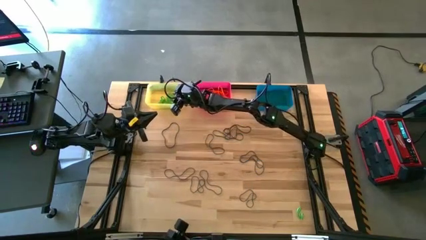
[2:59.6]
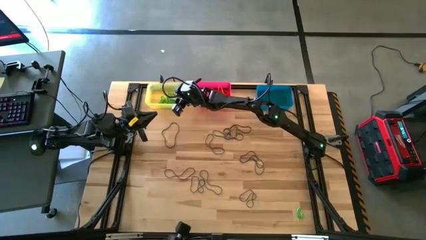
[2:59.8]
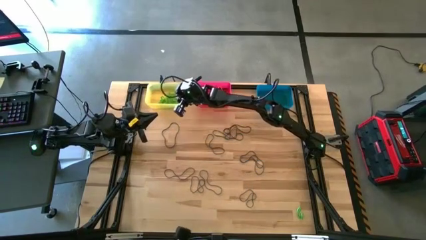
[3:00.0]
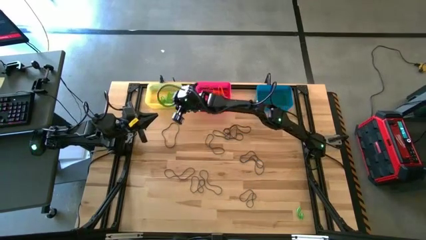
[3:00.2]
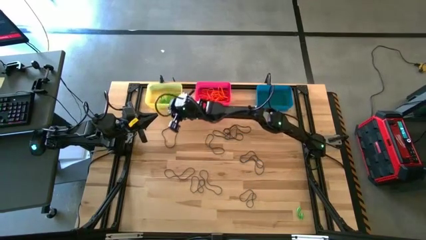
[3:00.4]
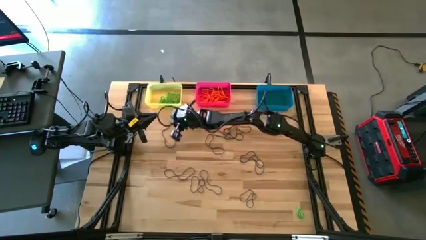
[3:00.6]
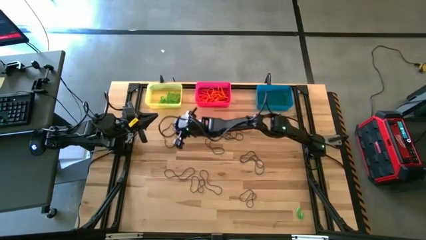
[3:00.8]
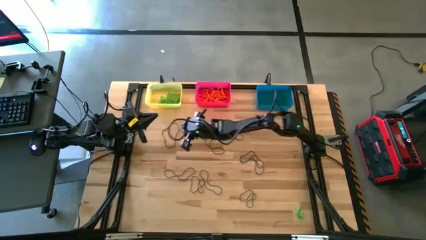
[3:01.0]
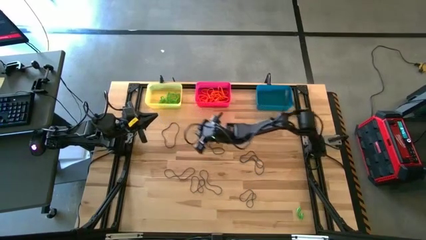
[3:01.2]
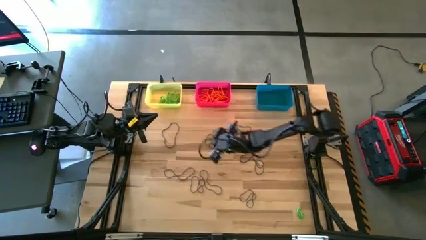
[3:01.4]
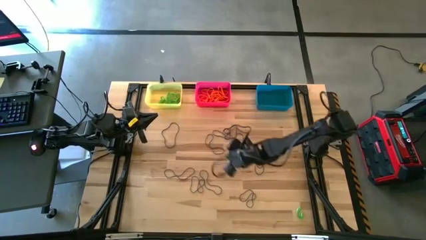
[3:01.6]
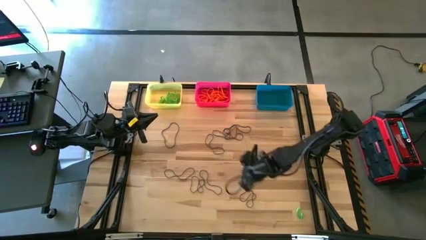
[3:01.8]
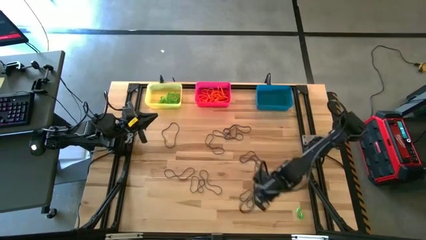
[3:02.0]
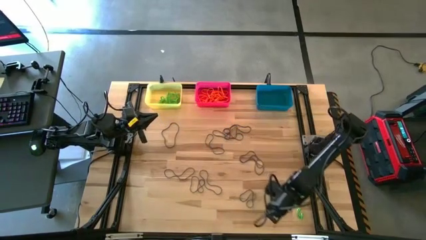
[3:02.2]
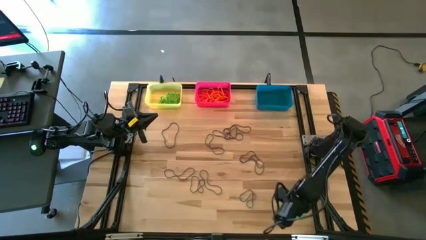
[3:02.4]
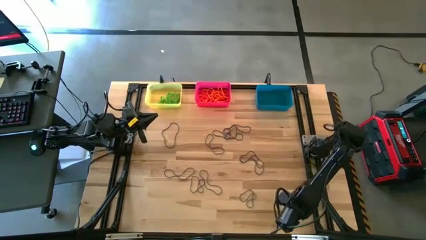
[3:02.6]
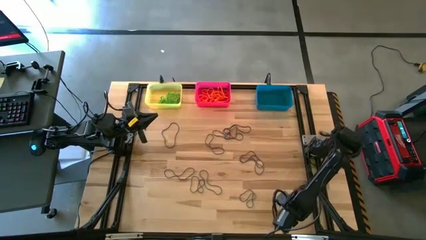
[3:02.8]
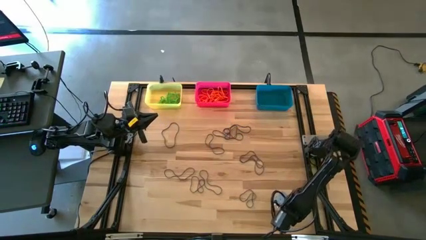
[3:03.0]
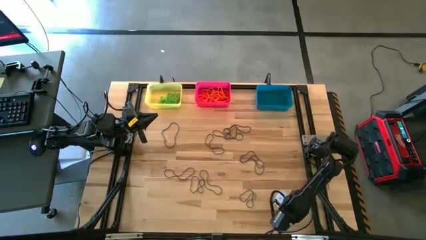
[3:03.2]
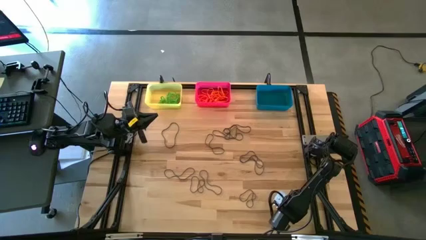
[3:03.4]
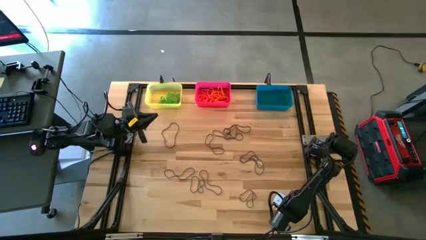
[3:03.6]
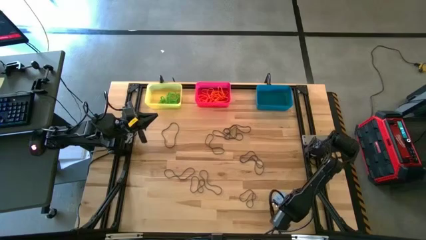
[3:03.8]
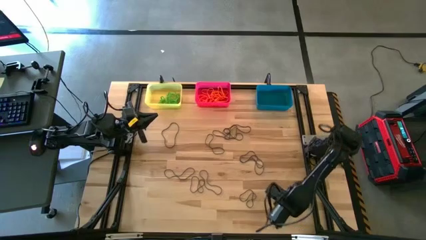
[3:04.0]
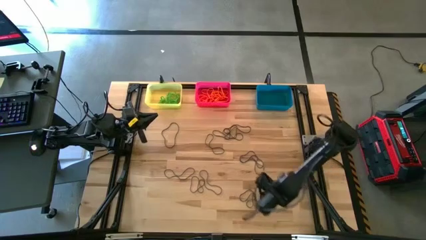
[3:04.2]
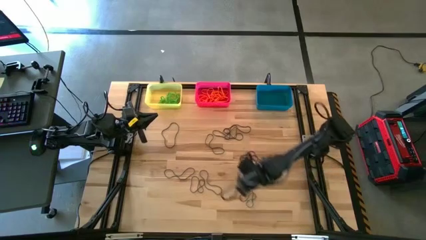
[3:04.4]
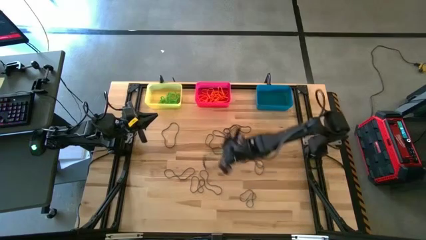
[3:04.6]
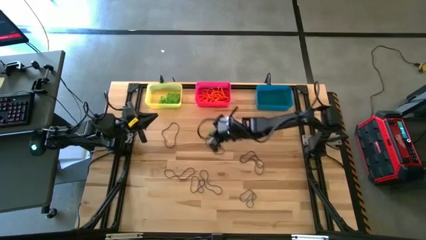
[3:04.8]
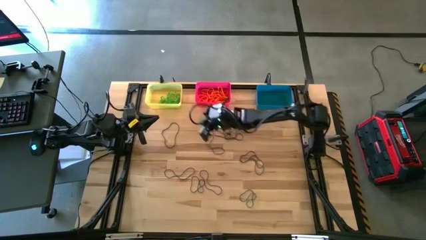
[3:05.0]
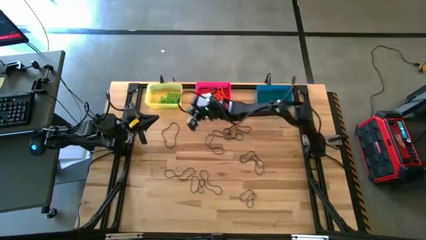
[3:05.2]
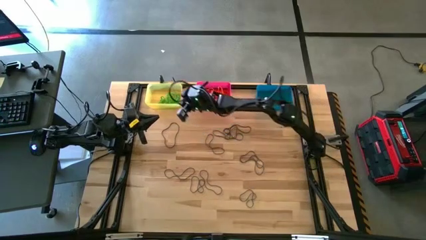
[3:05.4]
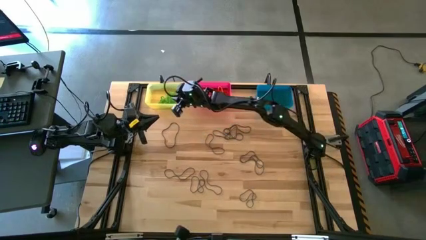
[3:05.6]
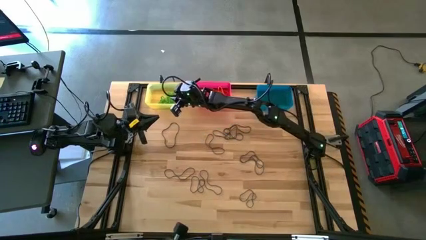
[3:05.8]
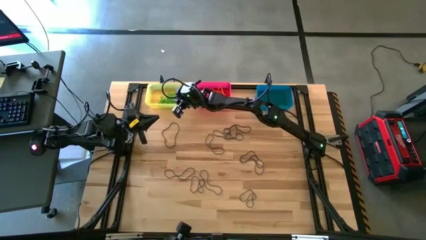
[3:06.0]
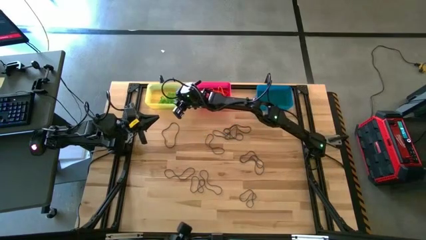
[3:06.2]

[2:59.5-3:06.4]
Task: Sort rubber bands into baskets
Put the green rubber band into the yellow bin

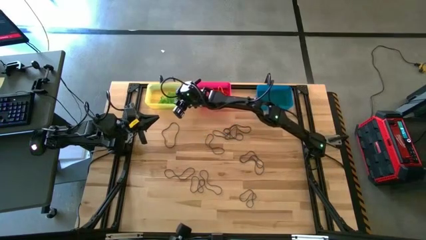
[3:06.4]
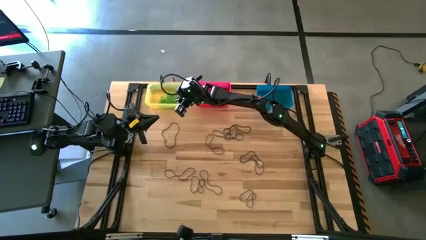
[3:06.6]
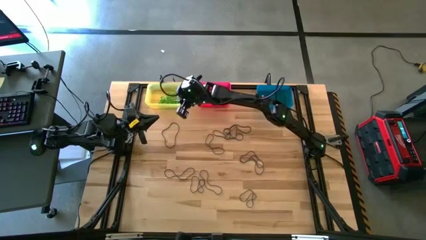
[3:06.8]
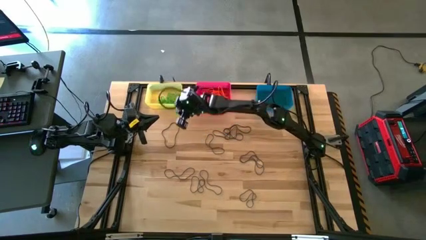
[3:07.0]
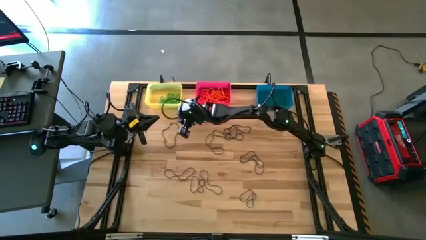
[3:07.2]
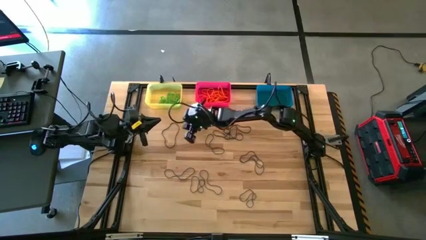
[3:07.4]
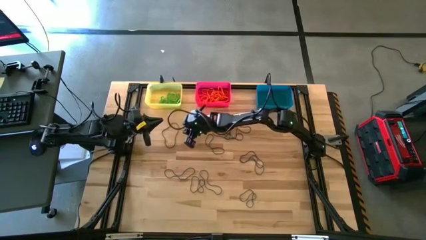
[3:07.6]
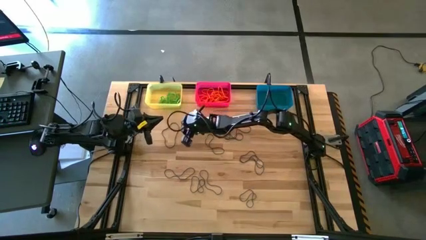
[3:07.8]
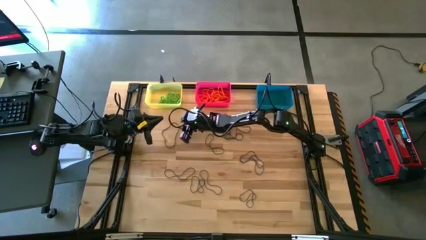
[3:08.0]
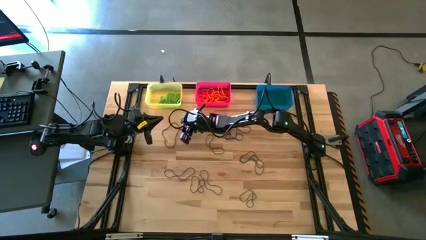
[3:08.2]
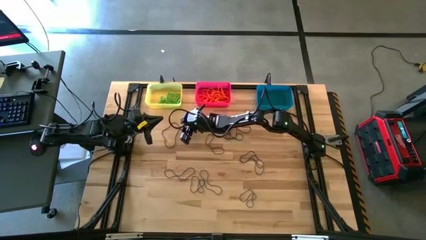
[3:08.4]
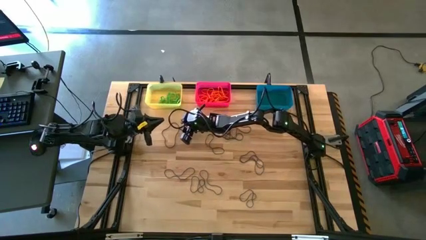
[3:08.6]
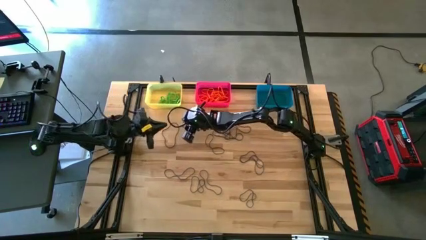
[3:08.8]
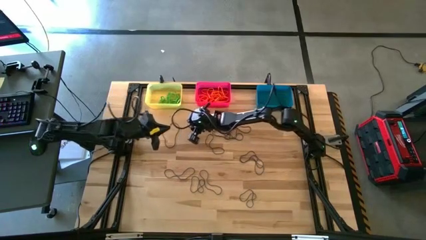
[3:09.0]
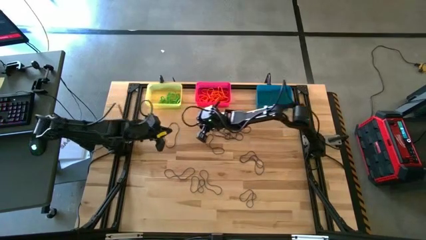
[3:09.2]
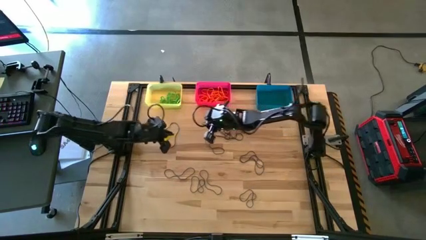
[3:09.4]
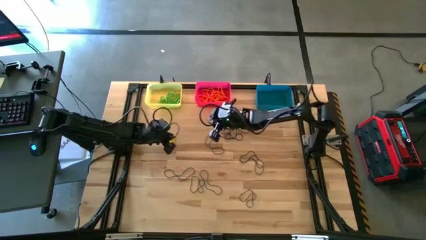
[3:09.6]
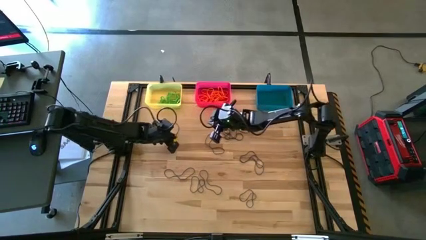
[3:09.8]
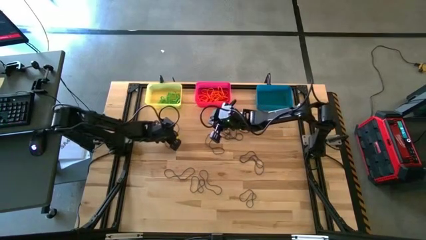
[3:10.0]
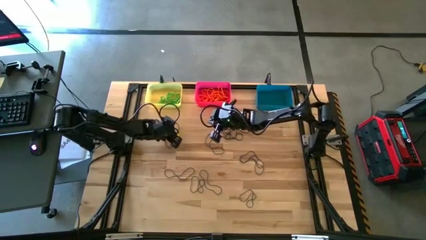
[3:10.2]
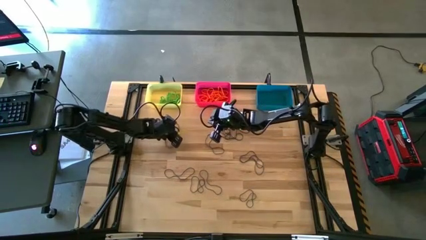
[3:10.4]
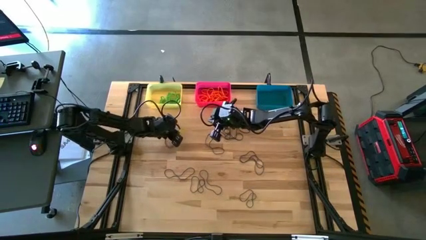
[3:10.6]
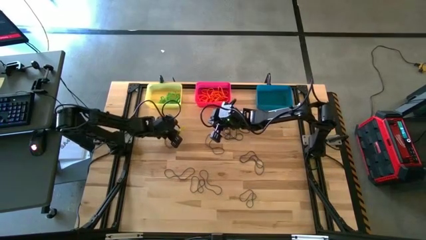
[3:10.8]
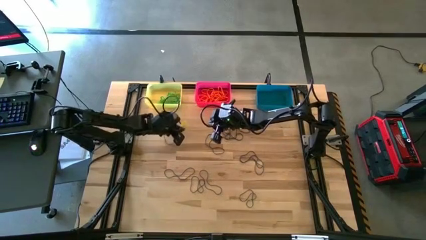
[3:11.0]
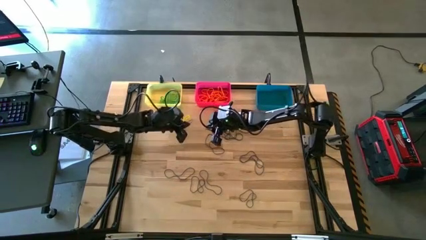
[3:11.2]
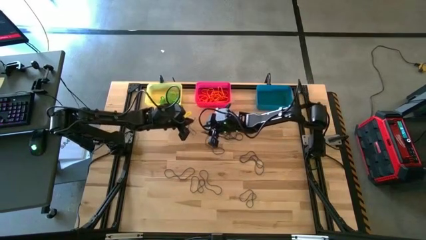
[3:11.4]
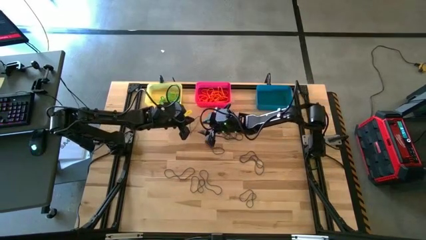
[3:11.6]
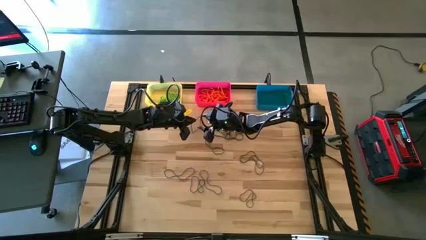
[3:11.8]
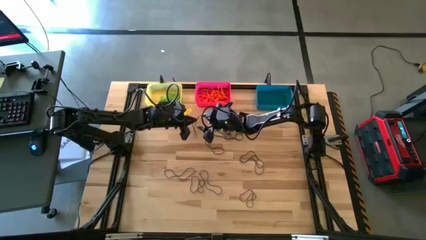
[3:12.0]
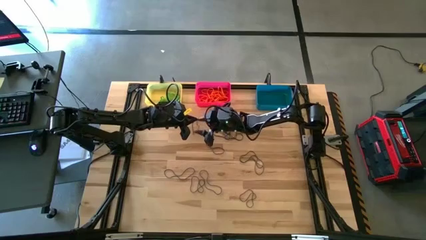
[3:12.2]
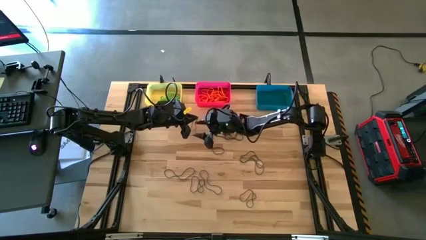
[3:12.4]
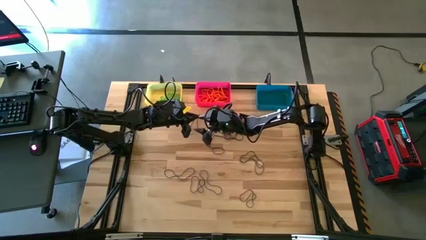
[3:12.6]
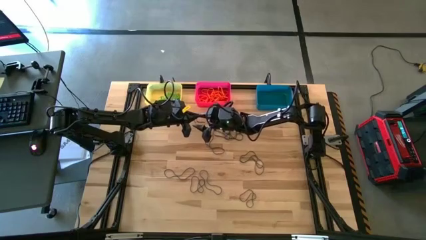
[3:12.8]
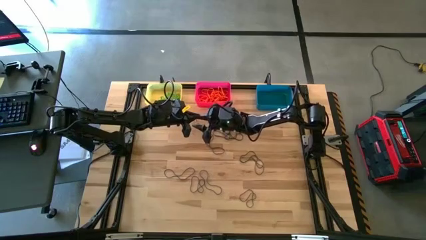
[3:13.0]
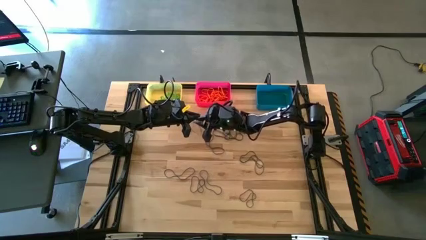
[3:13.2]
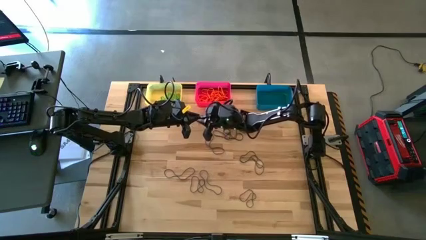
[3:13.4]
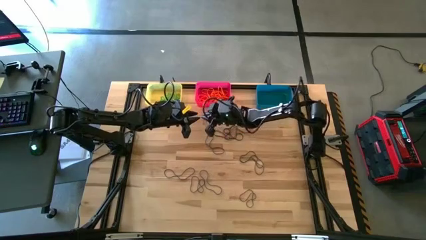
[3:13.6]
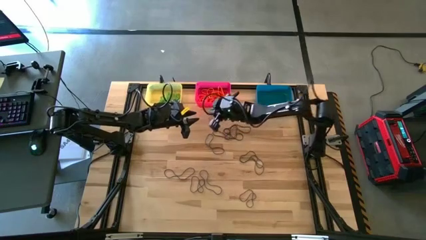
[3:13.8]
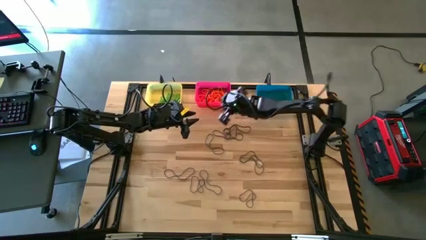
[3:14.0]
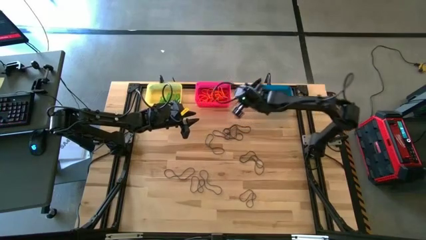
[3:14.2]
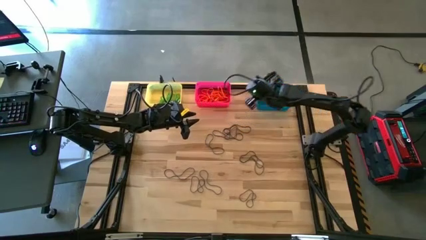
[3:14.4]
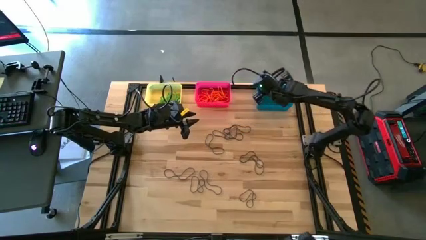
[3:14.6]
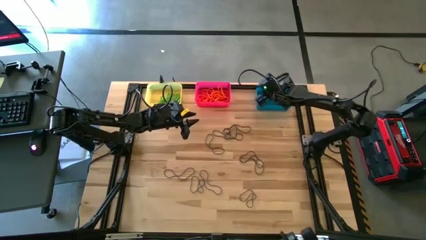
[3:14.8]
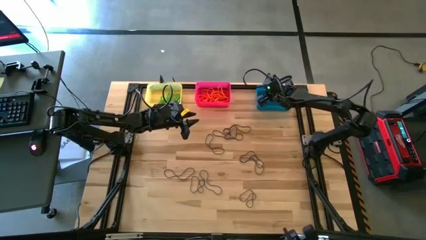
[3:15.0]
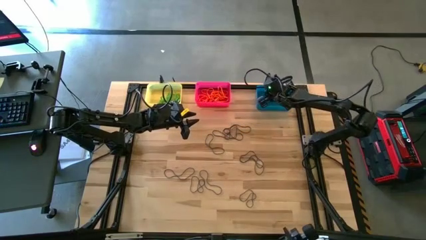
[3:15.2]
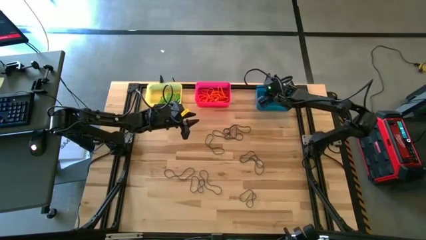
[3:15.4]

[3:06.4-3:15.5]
Put the violet rubber band into the blue bin
